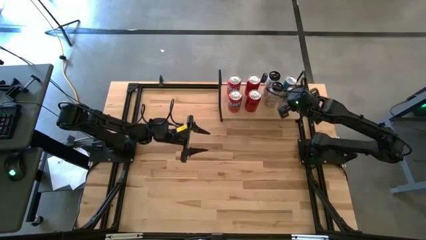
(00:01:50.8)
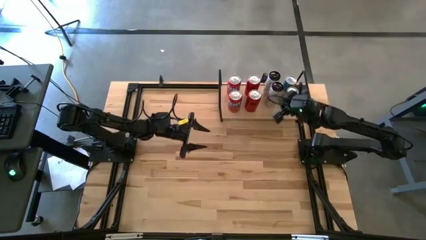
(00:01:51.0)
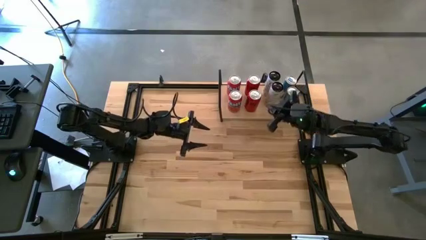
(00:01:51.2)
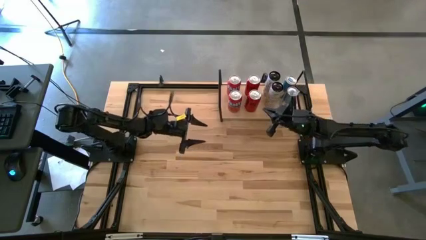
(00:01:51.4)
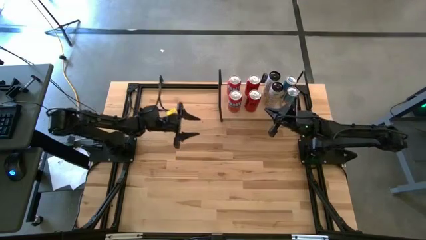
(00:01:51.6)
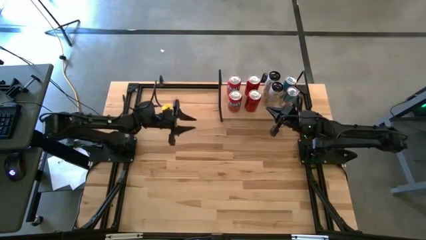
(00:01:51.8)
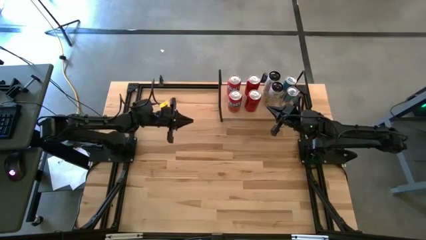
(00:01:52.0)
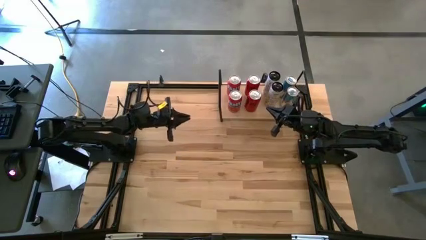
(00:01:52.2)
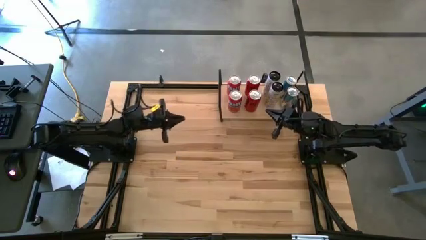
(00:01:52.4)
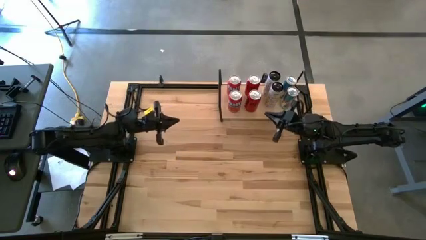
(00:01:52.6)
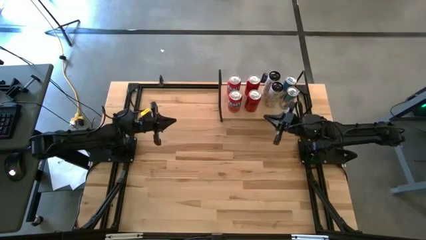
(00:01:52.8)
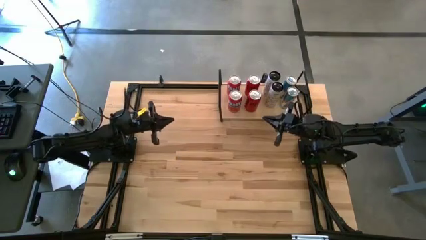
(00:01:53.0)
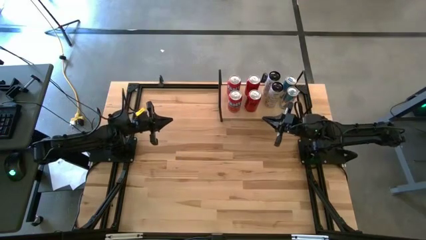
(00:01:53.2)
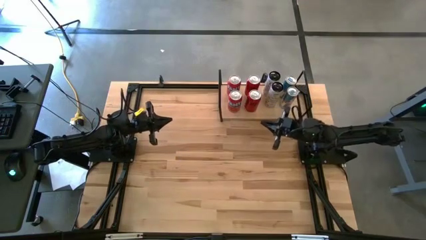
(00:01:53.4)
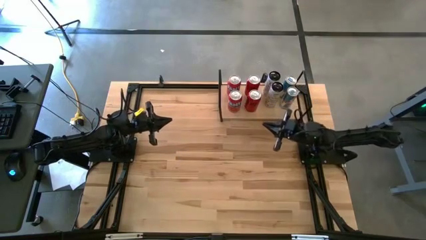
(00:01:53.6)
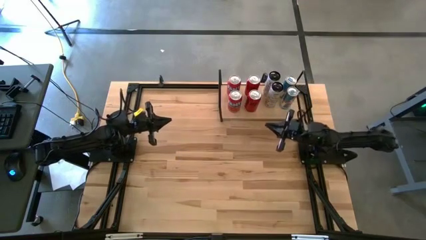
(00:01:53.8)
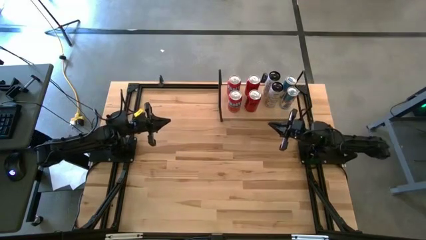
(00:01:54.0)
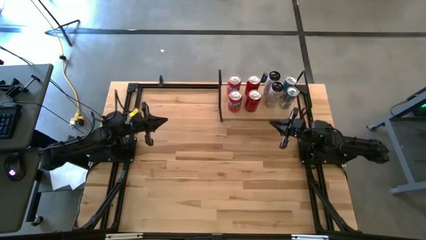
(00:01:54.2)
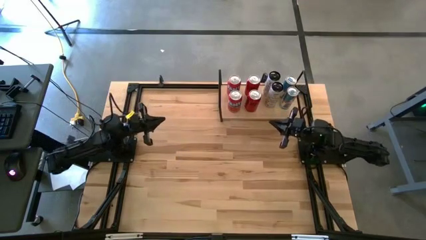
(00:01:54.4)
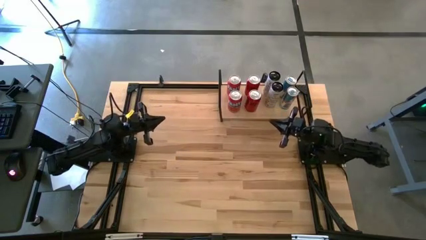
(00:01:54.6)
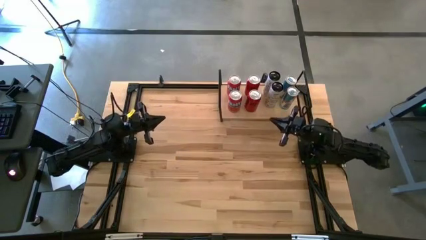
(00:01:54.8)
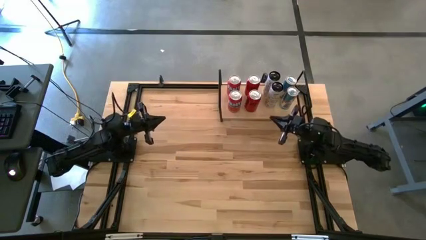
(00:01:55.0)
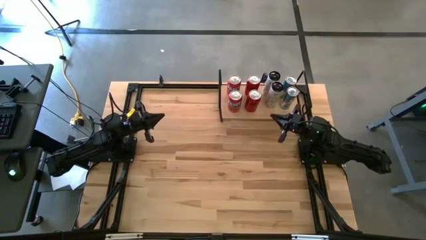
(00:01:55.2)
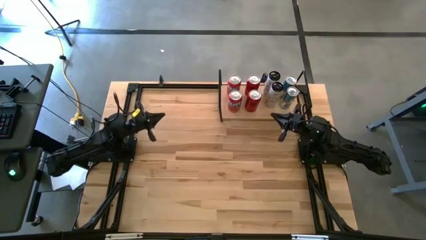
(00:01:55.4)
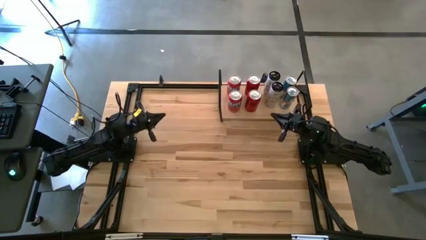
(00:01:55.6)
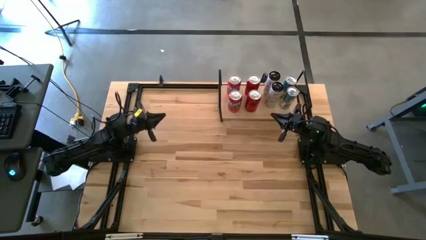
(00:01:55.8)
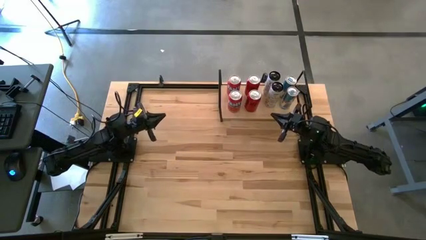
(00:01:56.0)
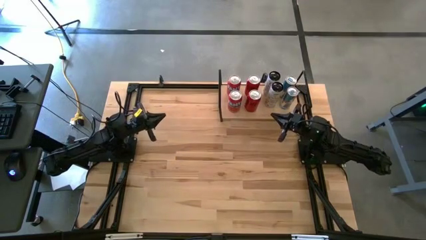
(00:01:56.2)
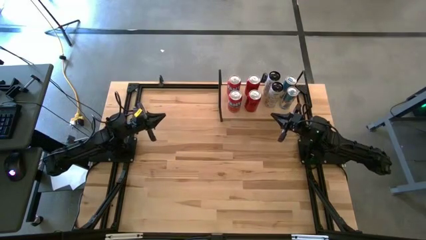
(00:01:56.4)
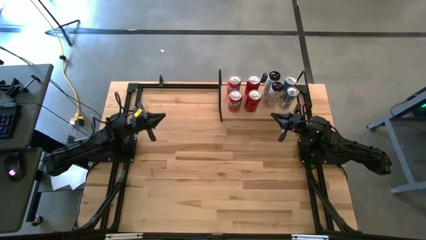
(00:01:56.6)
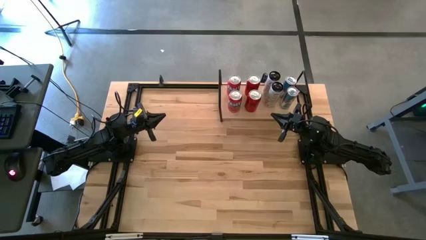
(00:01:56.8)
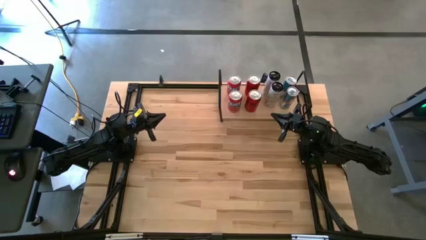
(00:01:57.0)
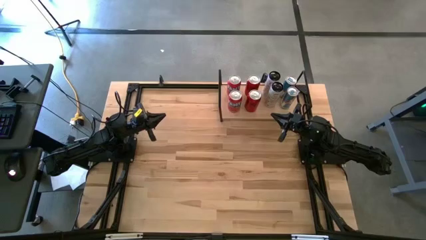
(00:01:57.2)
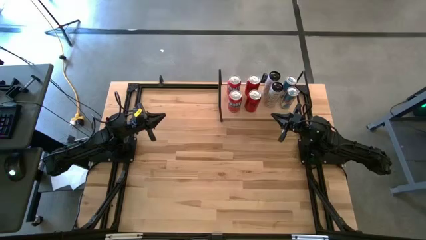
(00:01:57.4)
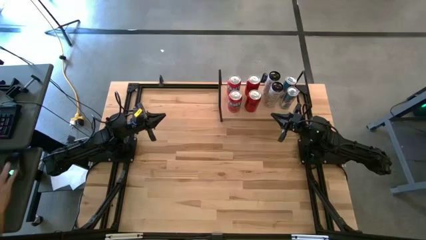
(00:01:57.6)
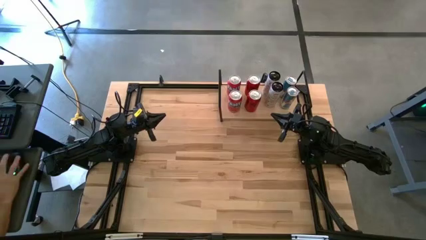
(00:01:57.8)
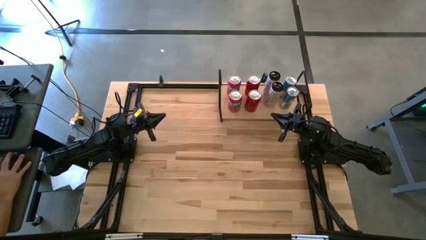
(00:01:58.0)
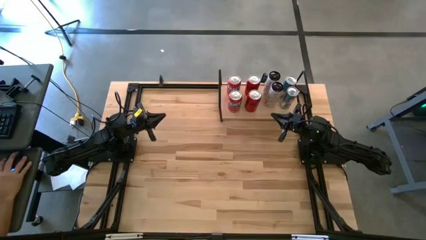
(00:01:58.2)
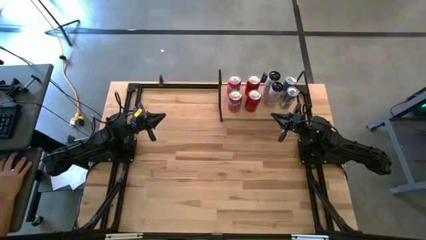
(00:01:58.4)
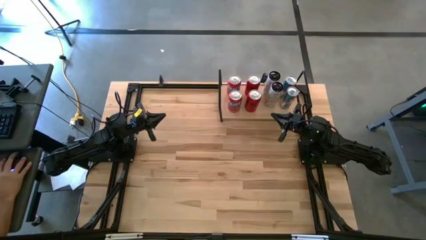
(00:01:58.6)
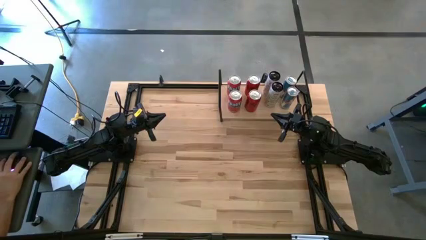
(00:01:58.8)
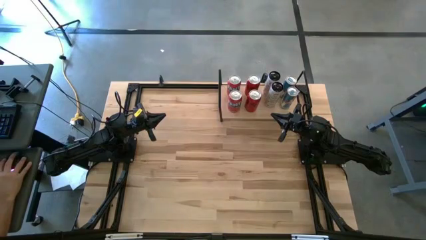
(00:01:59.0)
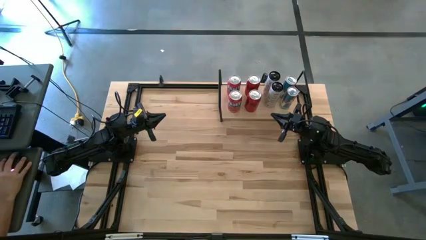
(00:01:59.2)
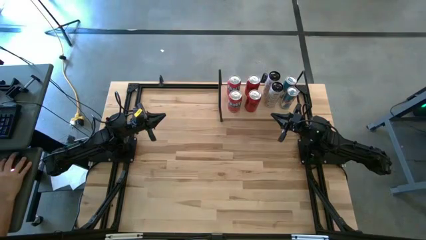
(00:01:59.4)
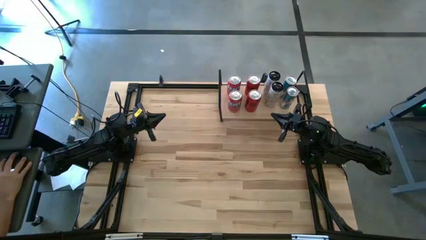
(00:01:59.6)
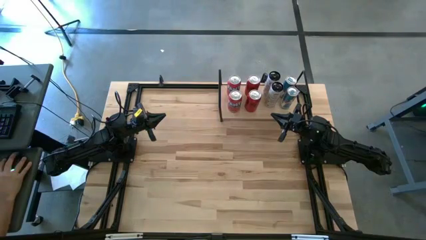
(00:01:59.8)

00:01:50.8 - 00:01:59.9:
Task: Place canned beverage on shelf
Return to Home Position

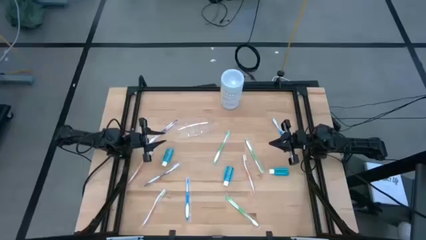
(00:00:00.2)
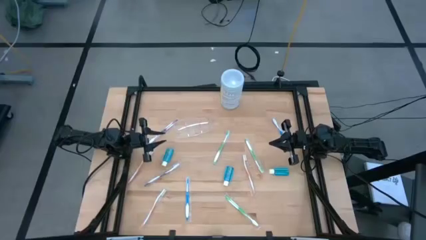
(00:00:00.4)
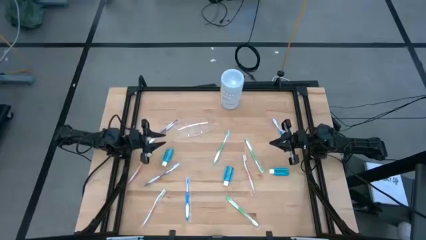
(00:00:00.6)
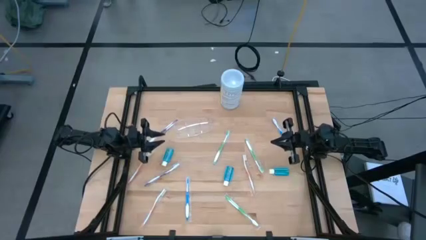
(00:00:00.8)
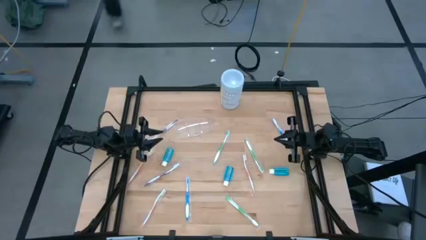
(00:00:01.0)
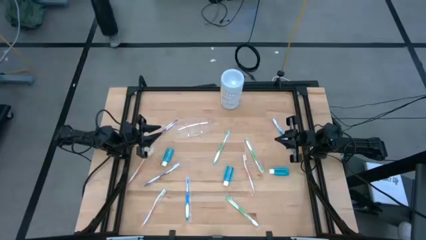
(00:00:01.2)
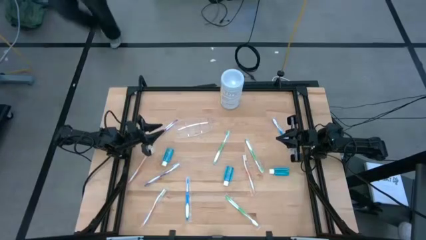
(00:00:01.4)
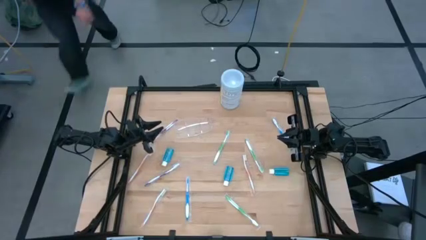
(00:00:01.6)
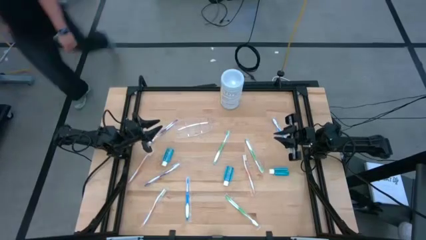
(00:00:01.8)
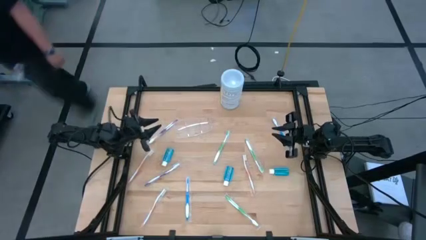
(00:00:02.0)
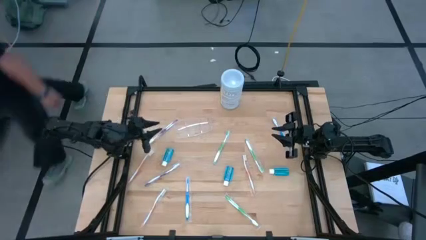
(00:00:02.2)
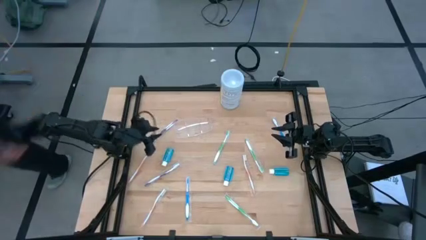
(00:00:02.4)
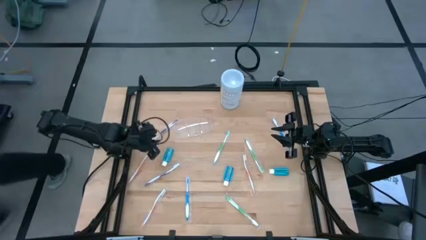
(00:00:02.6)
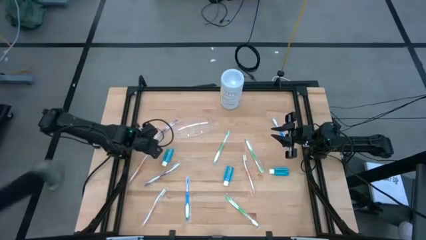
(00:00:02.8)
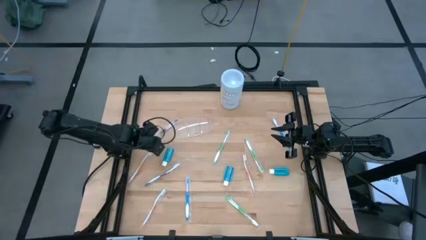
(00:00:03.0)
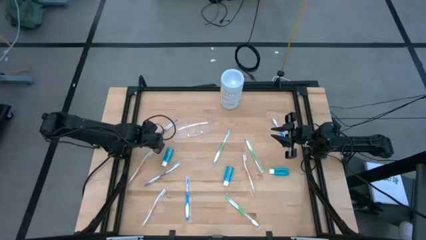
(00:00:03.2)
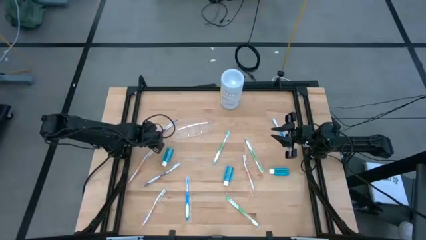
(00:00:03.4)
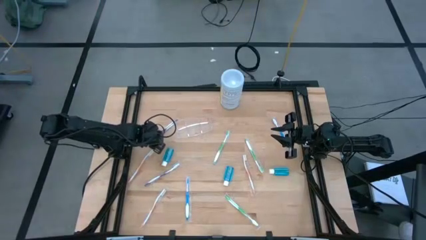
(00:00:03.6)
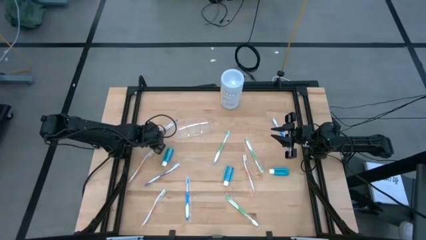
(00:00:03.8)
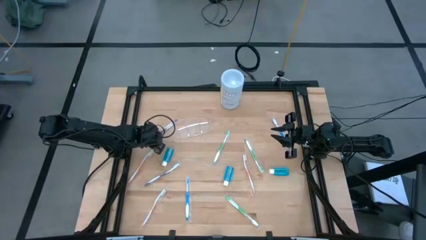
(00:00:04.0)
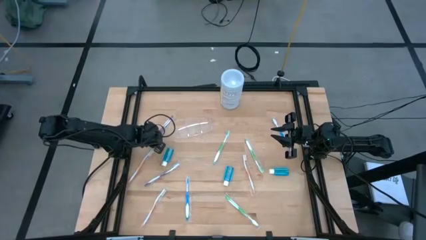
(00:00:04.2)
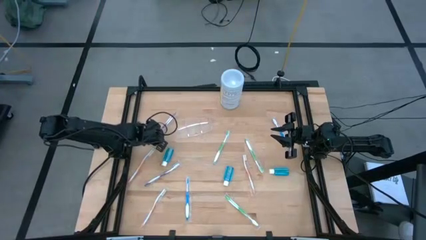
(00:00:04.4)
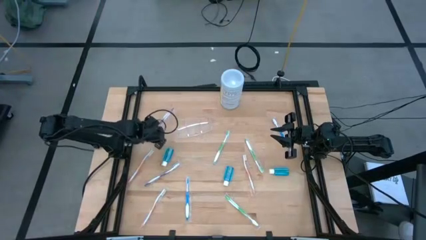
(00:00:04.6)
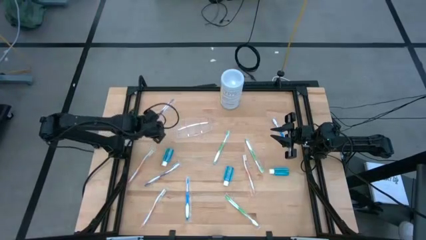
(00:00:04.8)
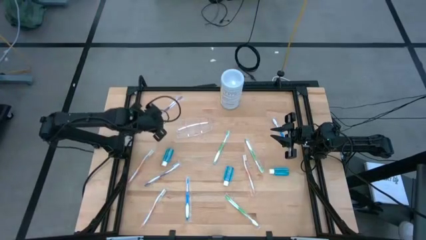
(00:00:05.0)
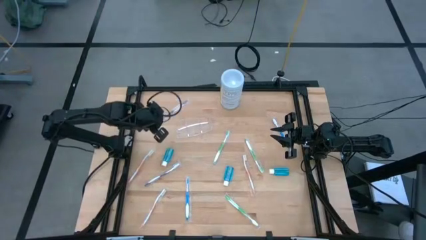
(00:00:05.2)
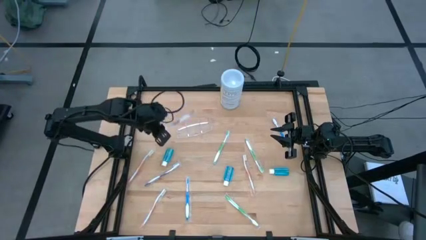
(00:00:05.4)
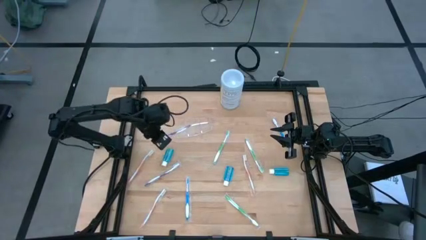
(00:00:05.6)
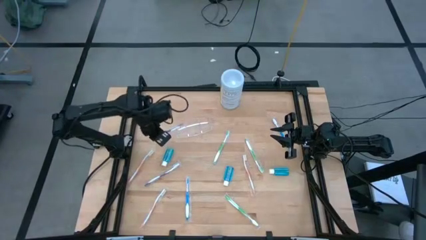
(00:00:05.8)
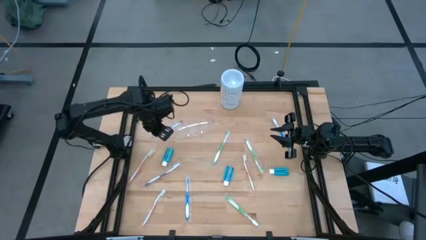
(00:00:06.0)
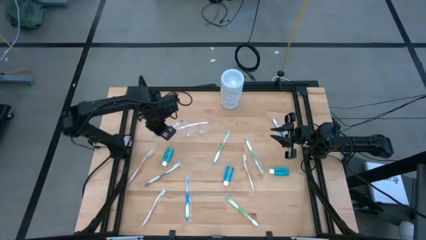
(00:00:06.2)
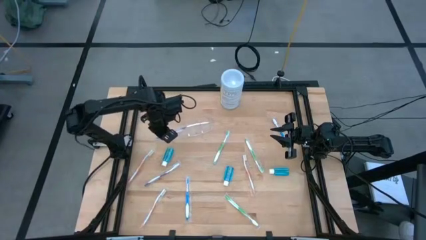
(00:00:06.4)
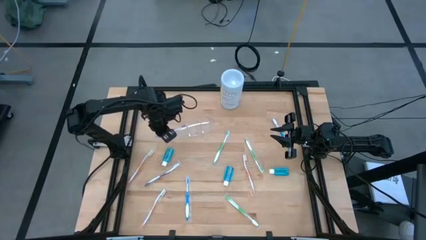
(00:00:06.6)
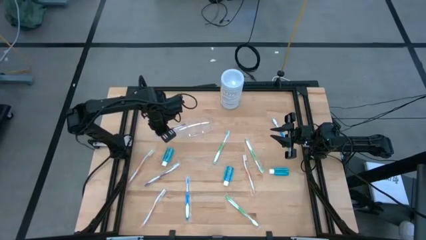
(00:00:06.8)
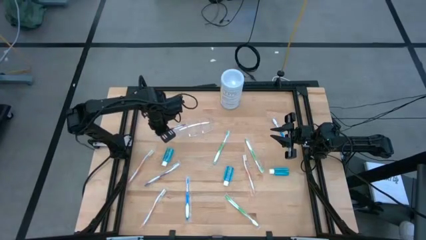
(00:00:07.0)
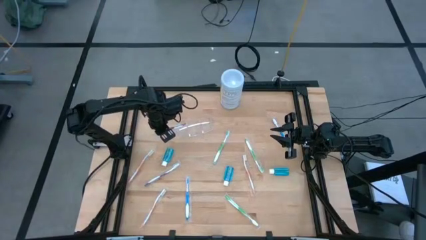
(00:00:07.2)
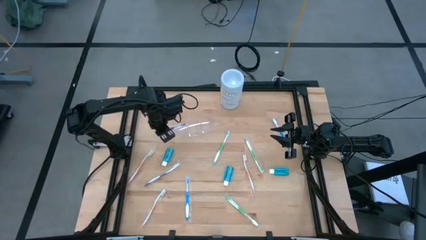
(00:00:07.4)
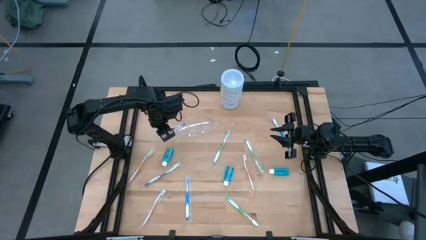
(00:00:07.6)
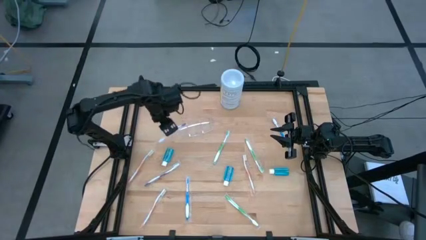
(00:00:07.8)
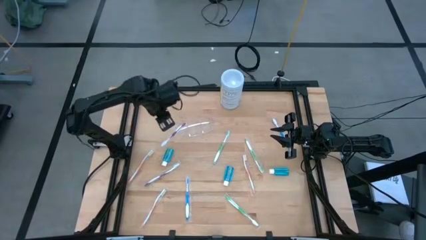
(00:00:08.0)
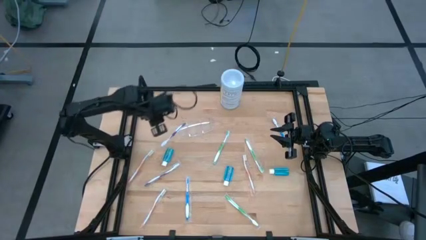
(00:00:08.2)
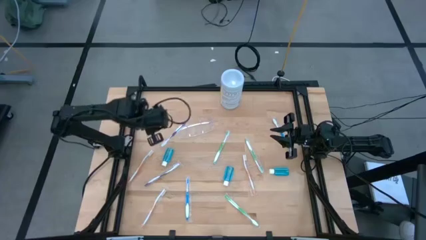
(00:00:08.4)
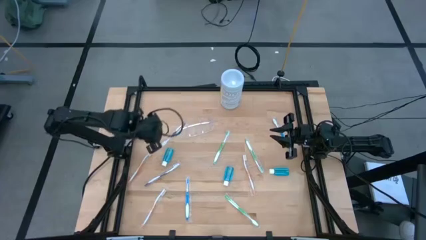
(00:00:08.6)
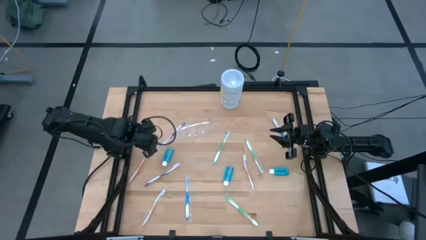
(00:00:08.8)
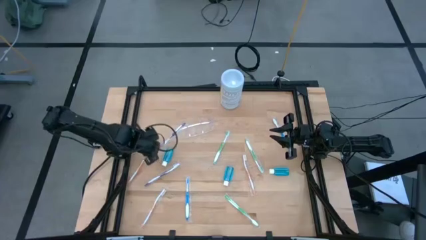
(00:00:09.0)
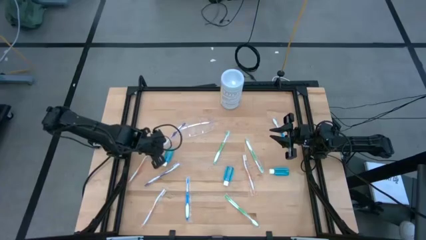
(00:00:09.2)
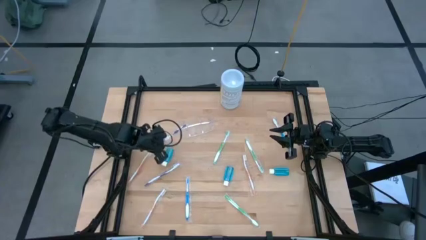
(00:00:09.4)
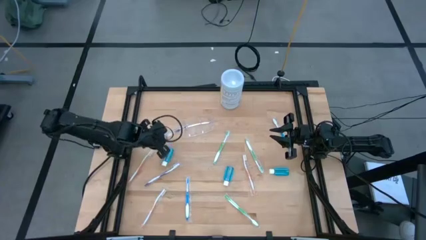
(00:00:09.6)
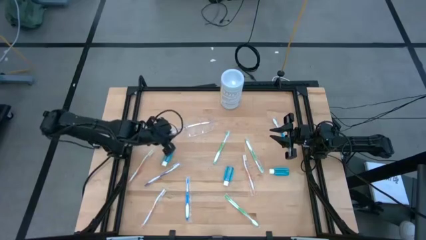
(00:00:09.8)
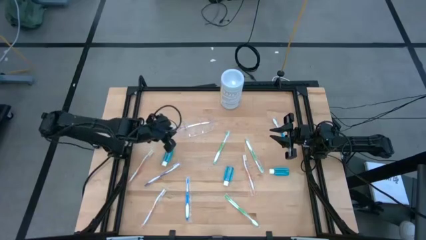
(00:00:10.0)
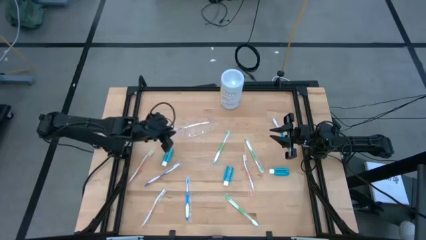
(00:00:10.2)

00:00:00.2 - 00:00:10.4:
Task: Pick & Place toothbrushing station
Put the top purple toothbrush into the transparent organizer
